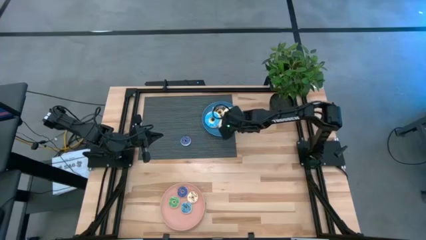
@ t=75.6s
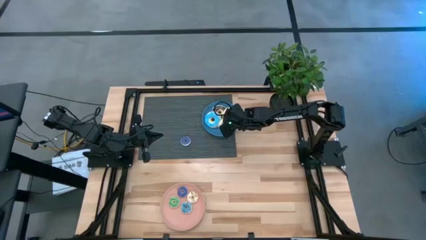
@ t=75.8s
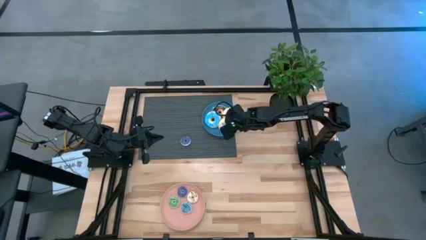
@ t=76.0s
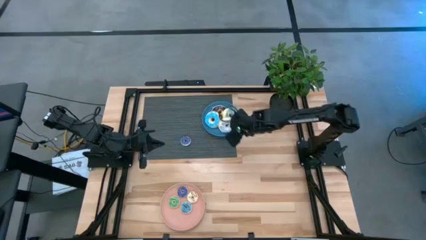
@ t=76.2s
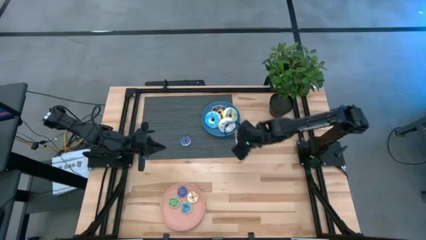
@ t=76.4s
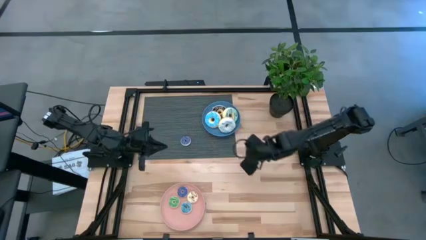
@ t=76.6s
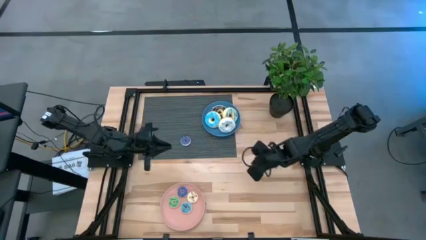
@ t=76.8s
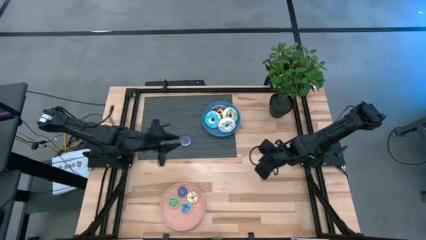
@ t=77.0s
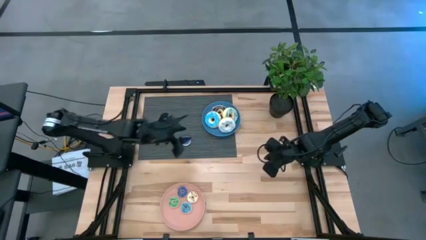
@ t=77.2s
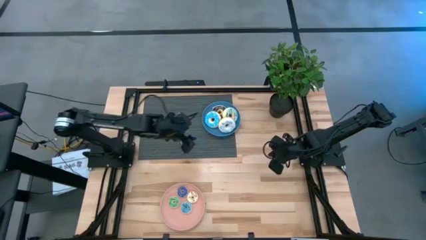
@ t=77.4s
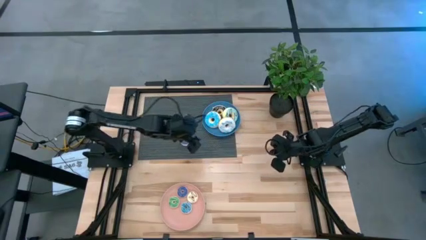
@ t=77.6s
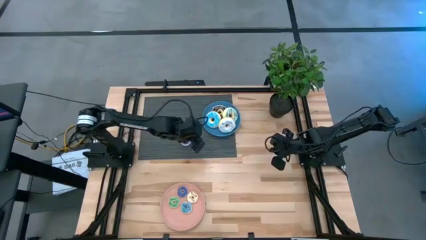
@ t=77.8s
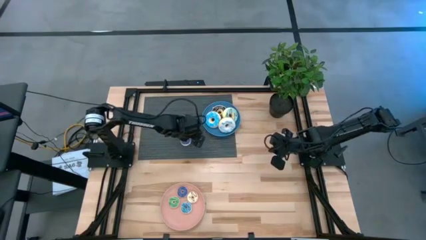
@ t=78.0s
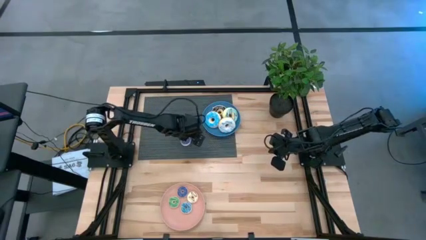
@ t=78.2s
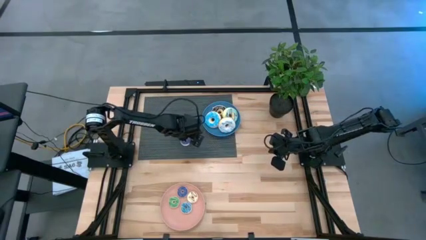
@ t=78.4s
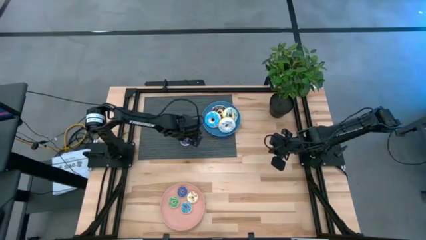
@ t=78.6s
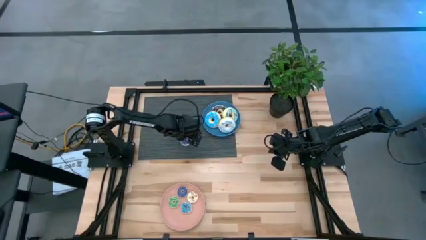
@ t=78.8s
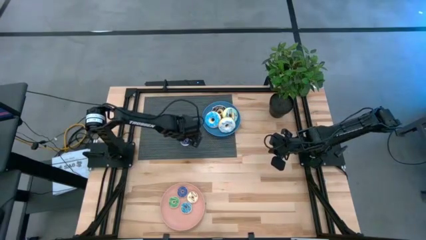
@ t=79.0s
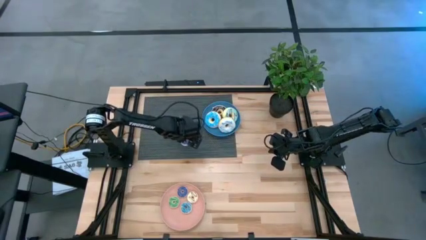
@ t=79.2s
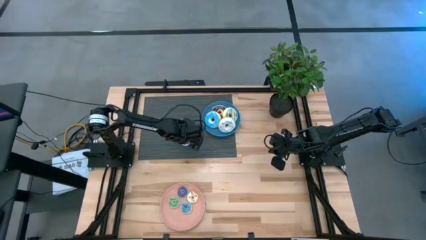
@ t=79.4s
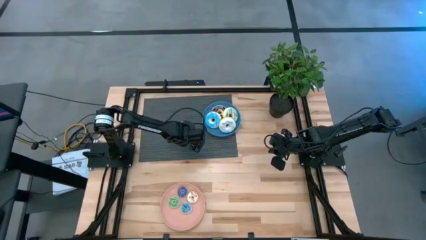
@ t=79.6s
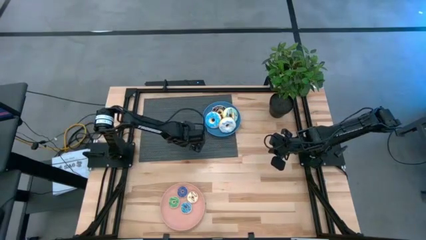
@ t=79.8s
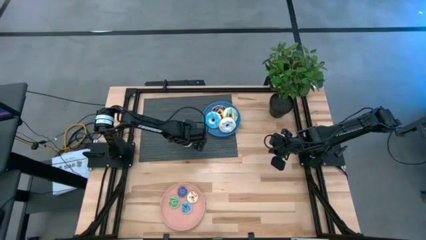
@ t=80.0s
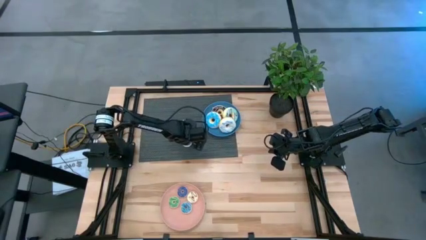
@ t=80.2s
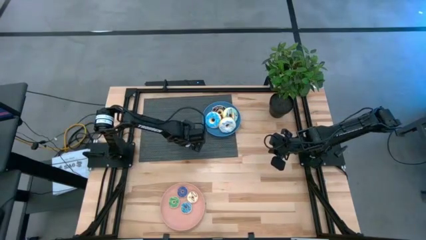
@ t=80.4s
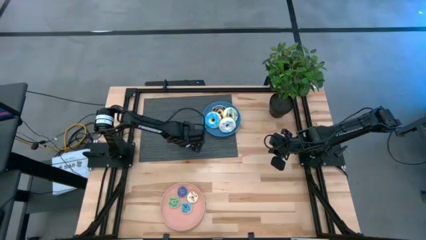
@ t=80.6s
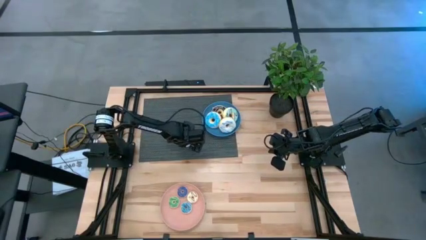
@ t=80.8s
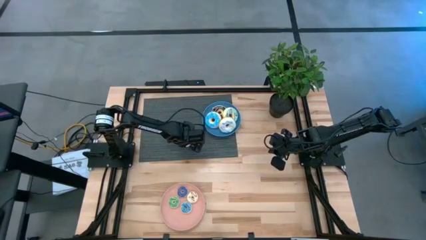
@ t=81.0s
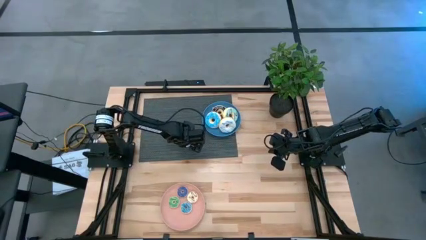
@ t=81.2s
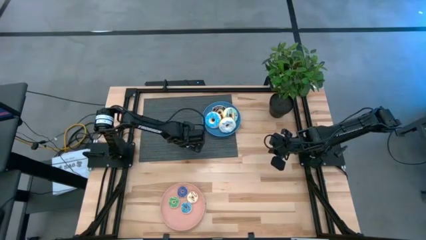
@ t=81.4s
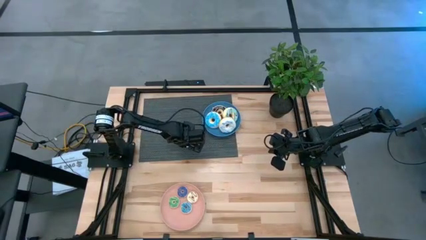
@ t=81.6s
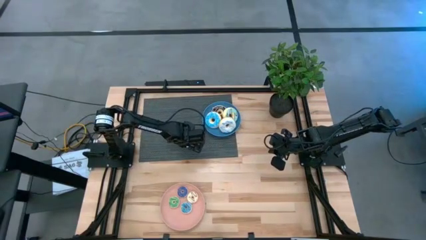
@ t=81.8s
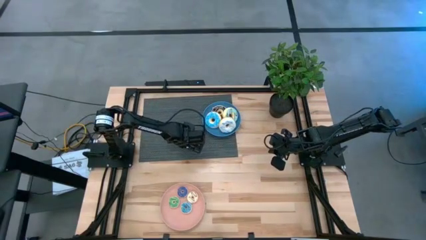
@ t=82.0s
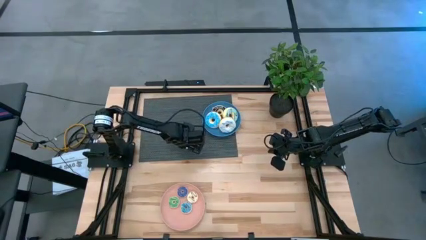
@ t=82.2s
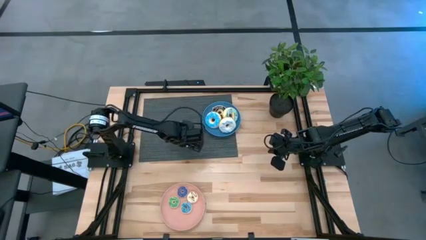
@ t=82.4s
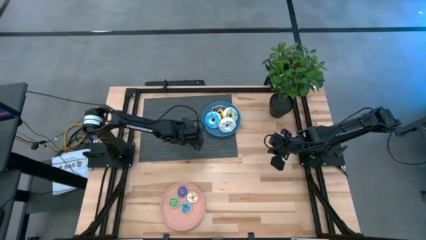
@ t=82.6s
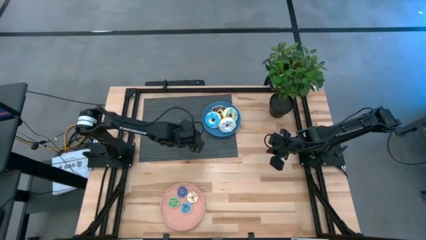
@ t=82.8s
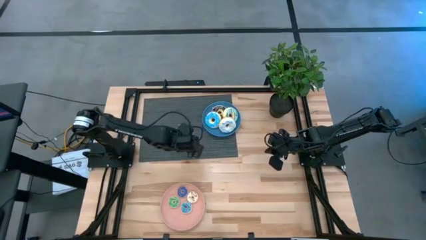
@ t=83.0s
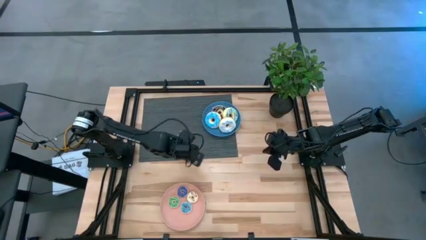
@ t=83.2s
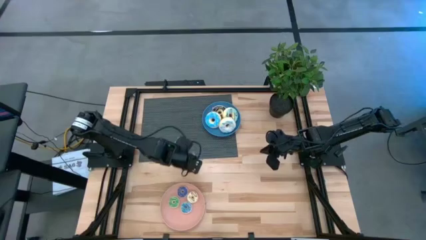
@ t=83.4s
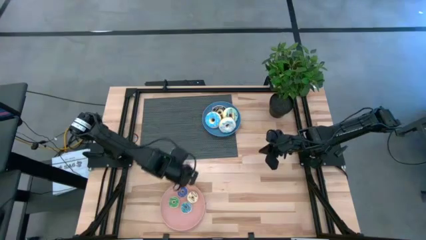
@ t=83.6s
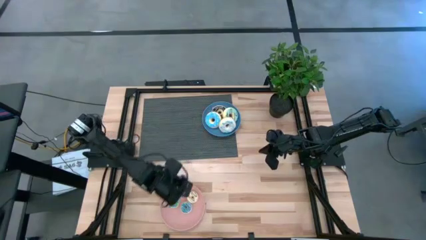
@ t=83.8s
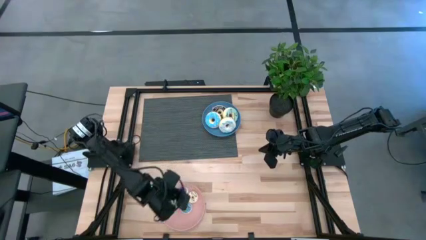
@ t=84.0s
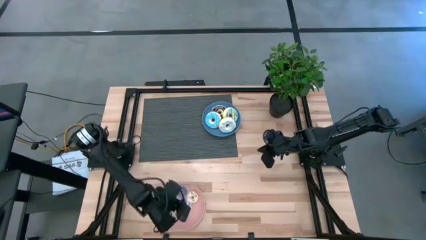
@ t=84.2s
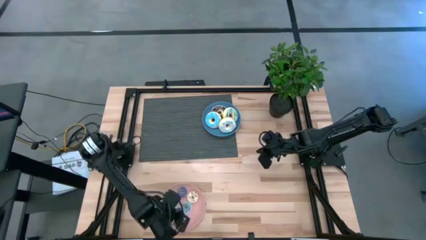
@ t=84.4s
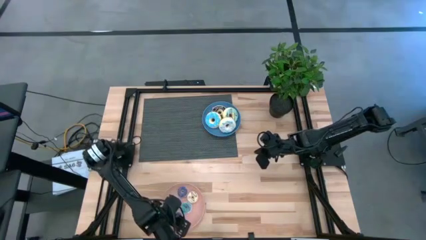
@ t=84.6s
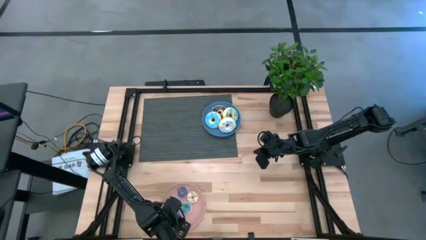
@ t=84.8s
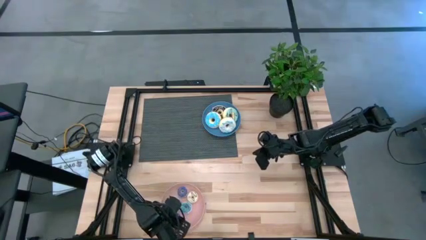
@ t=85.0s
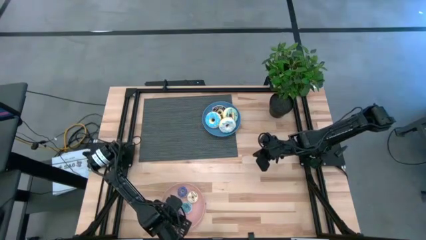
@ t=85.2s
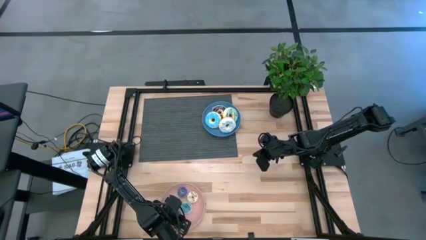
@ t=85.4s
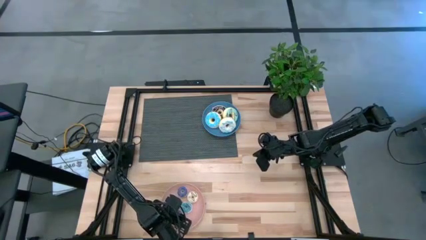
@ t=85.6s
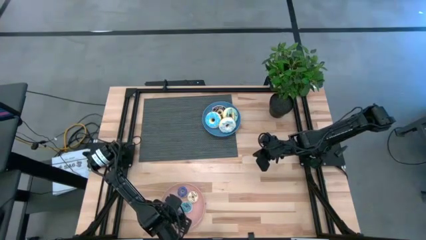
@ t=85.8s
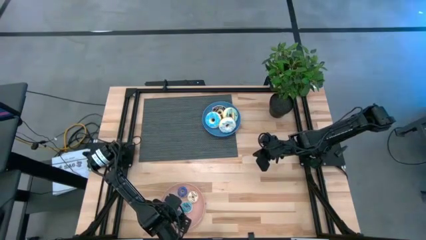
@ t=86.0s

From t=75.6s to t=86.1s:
Task: Pick & Place donuts
Put the small dark blue donut on the pink plate

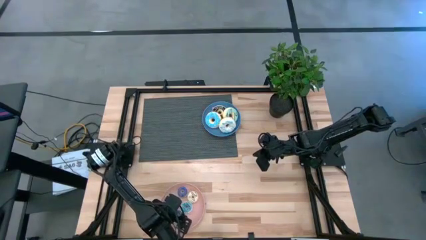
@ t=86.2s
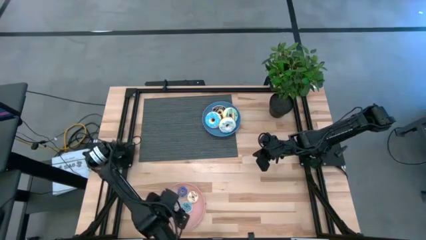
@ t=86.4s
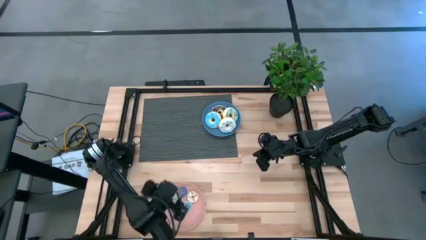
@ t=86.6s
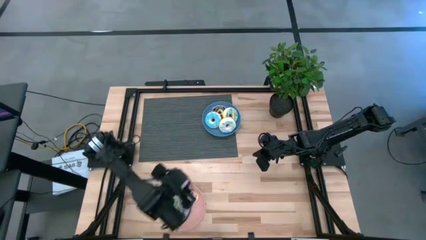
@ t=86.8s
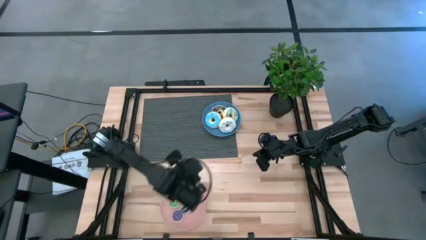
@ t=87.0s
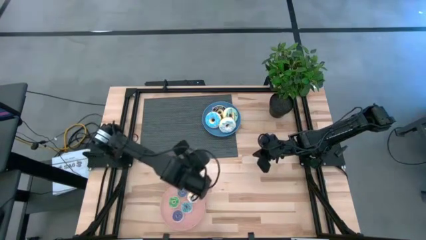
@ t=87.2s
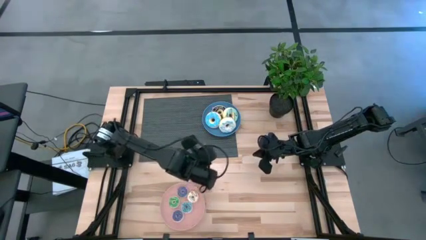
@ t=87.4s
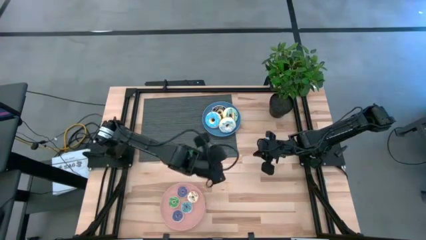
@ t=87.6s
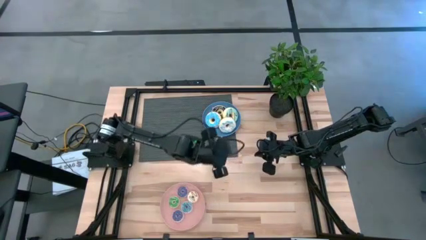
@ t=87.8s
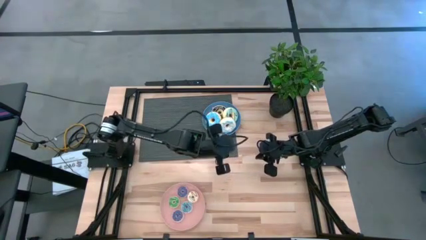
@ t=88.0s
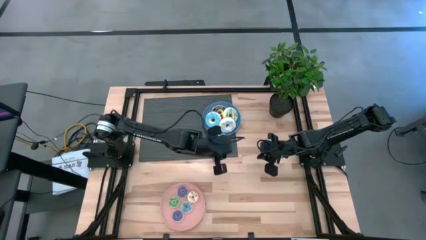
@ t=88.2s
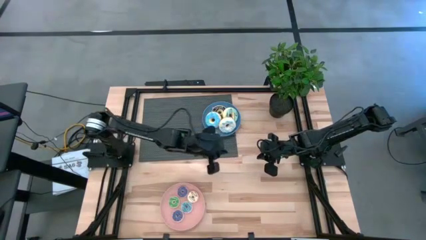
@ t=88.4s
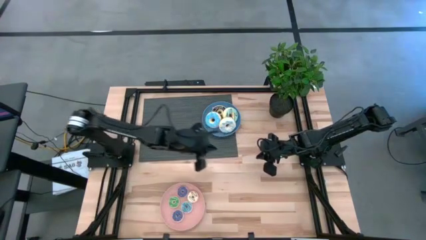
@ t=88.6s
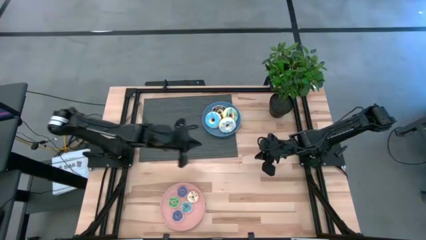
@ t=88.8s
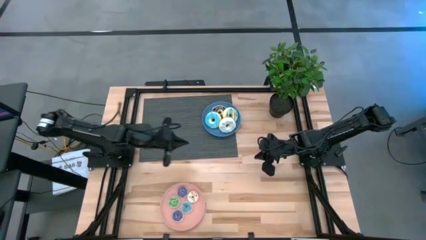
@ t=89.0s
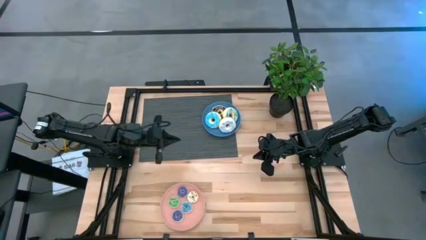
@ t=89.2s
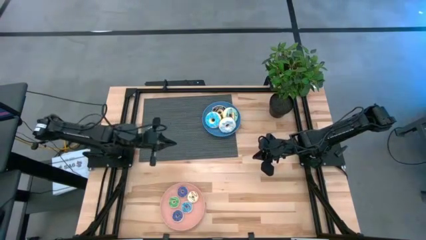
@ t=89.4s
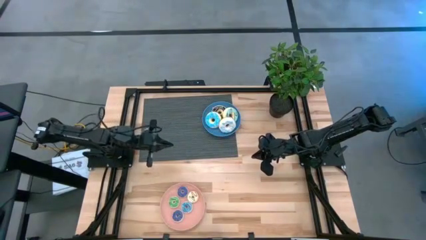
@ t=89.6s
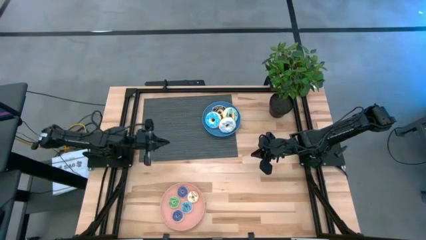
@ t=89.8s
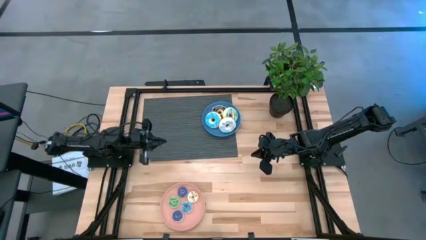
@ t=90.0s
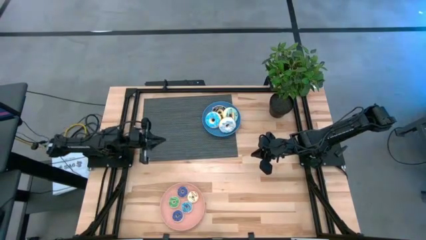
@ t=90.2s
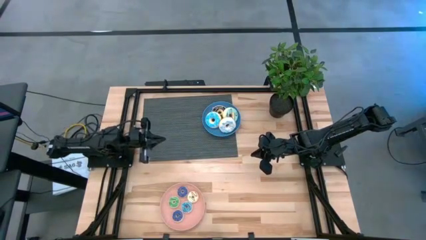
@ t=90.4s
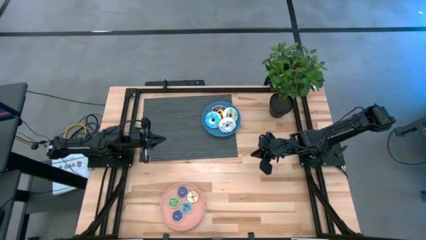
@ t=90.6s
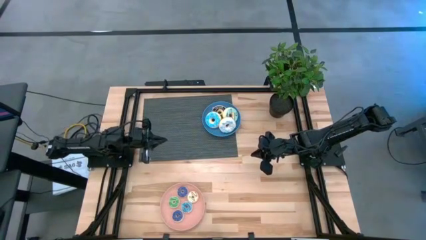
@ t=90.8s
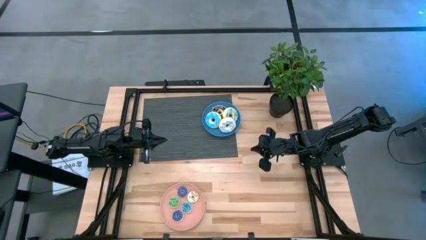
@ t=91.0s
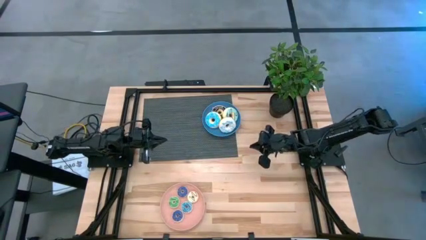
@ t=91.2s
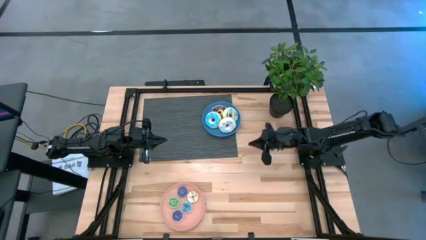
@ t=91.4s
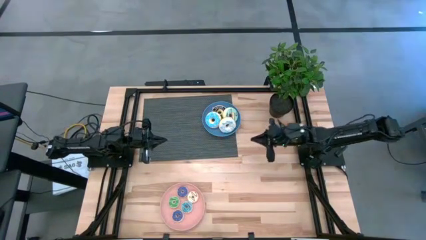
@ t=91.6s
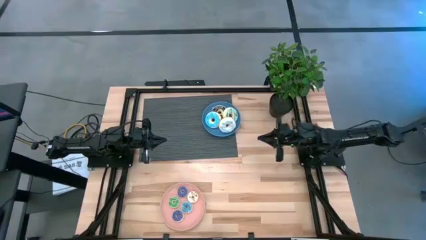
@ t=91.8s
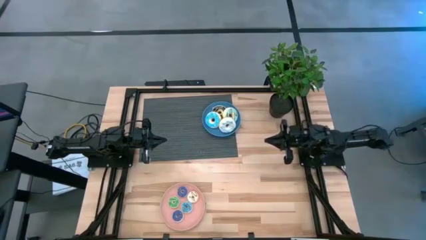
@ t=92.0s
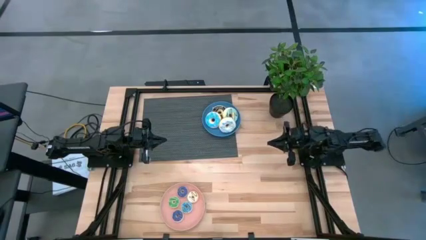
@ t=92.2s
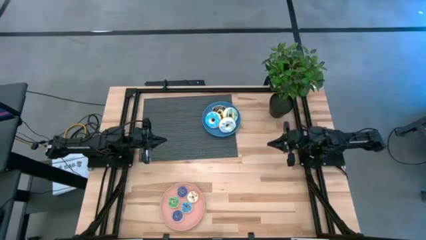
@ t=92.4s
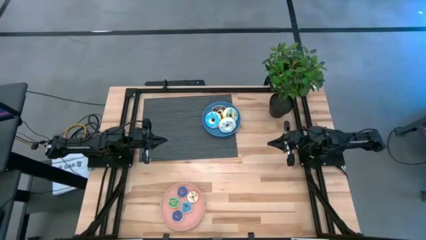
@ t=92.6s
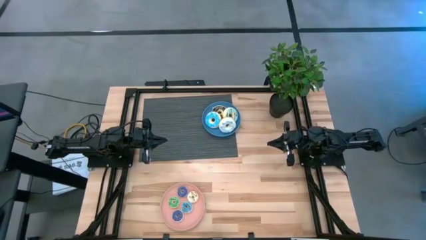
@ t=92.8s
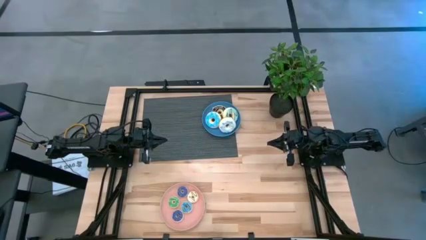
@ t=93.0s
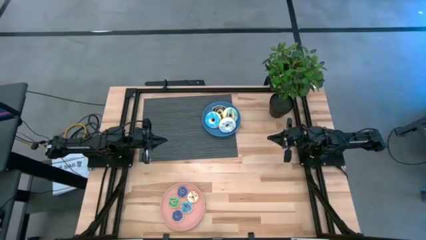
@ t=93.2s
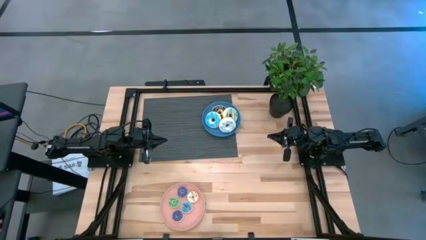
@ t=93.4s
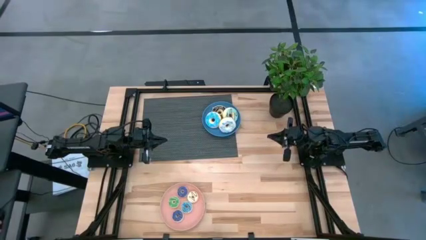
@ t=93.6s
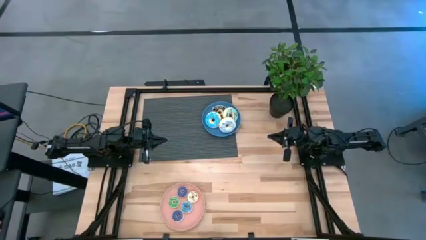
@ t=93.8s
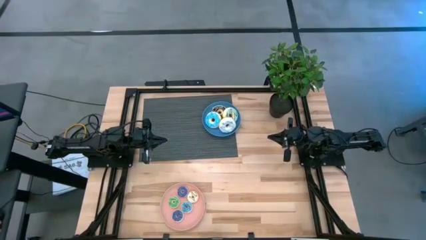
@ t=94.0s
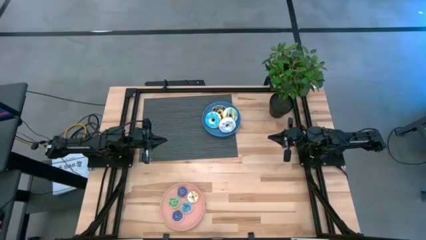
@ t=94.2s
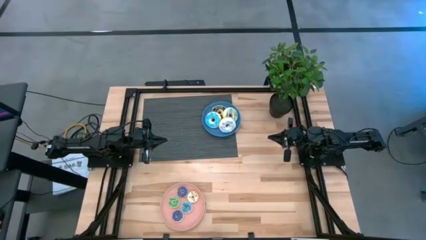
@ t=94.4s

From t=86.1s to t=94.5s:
Return to Home Position
